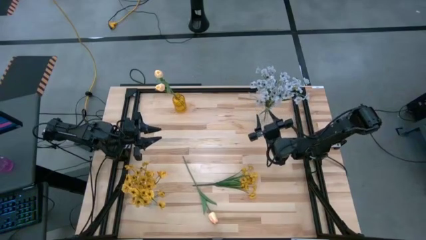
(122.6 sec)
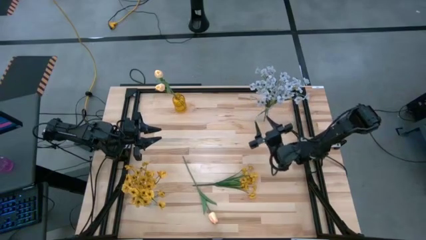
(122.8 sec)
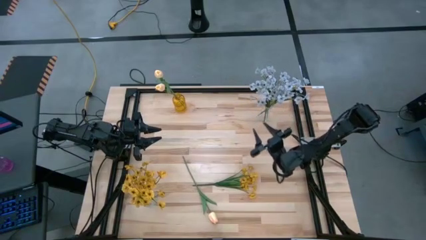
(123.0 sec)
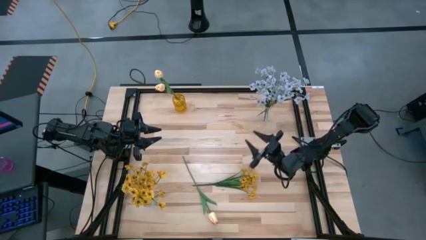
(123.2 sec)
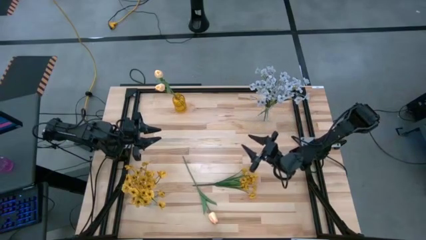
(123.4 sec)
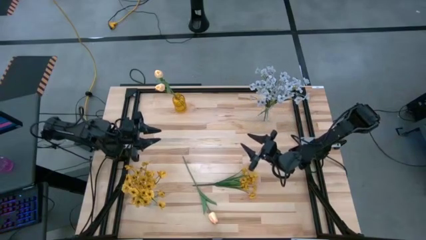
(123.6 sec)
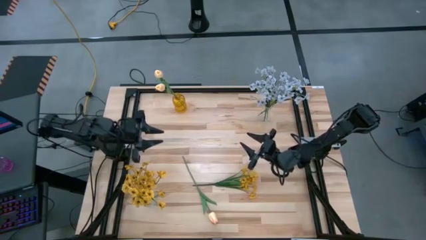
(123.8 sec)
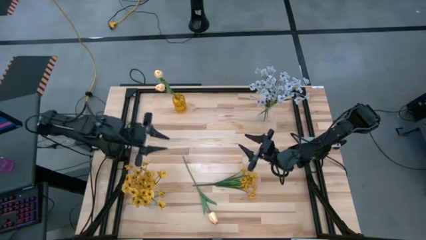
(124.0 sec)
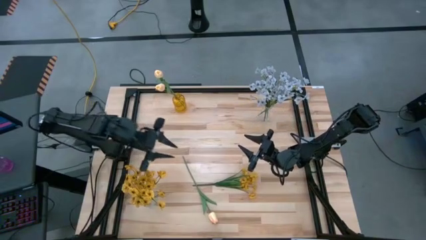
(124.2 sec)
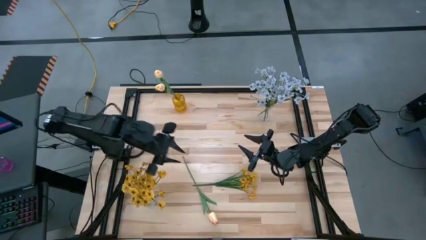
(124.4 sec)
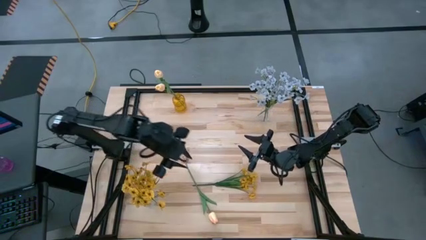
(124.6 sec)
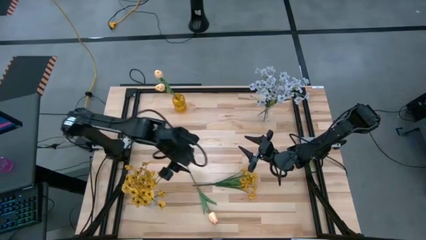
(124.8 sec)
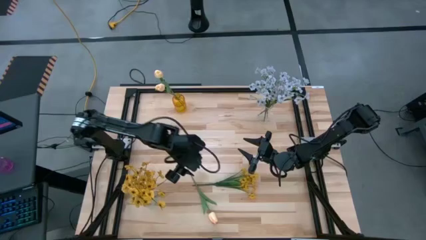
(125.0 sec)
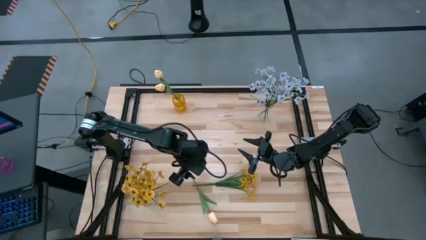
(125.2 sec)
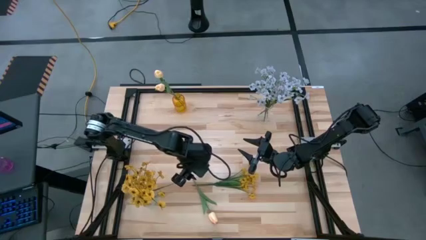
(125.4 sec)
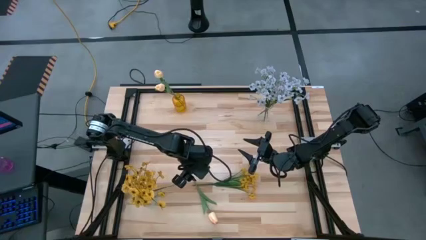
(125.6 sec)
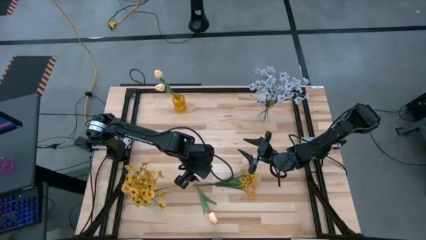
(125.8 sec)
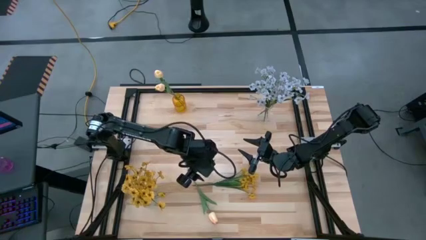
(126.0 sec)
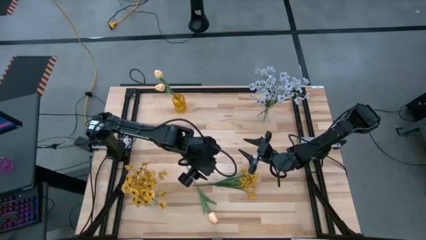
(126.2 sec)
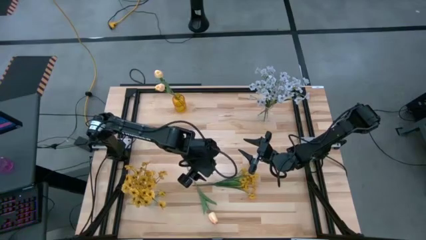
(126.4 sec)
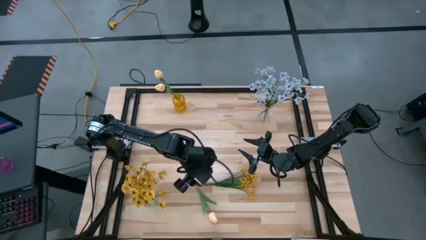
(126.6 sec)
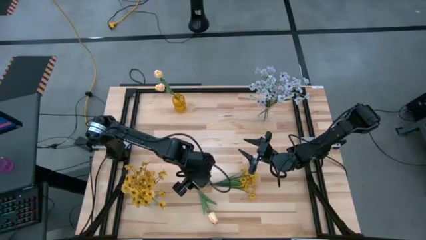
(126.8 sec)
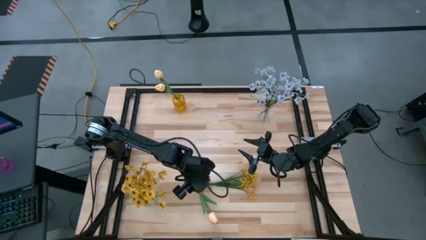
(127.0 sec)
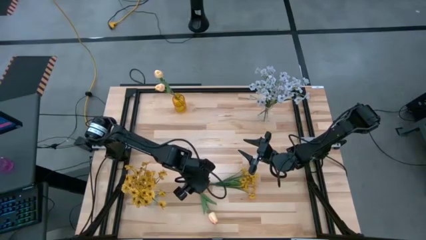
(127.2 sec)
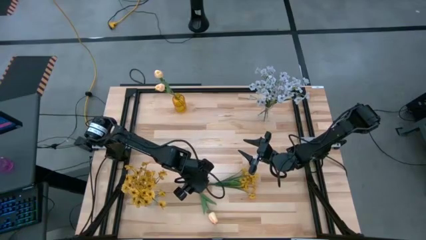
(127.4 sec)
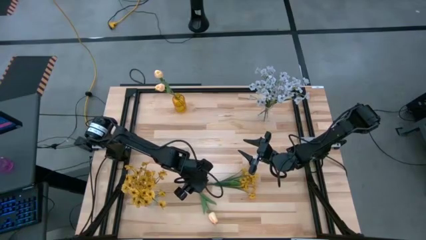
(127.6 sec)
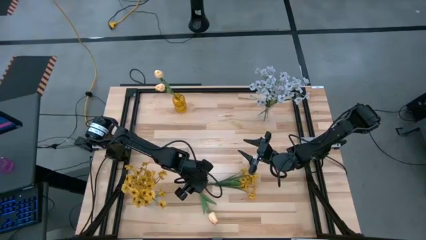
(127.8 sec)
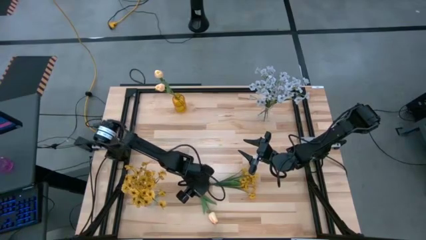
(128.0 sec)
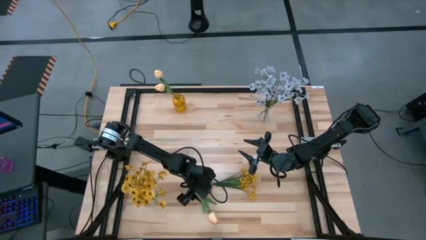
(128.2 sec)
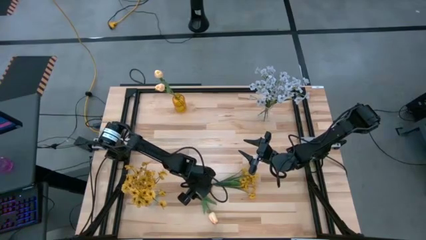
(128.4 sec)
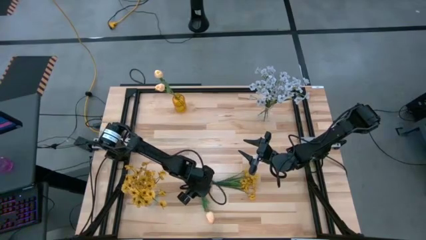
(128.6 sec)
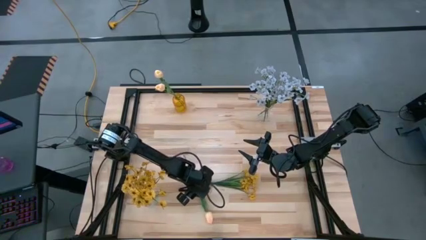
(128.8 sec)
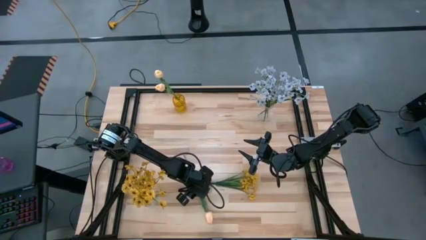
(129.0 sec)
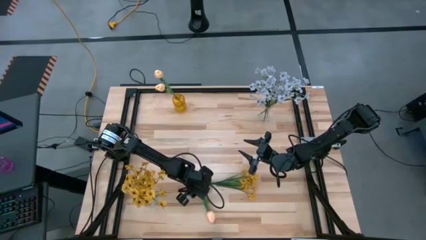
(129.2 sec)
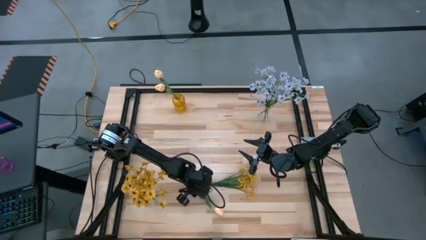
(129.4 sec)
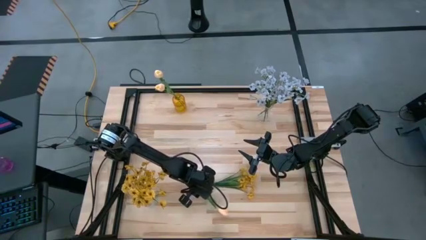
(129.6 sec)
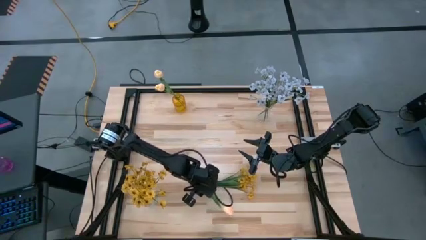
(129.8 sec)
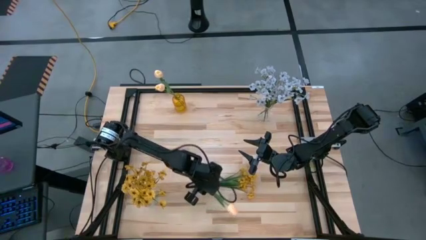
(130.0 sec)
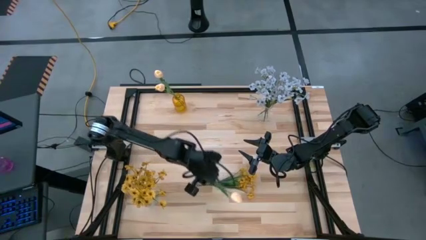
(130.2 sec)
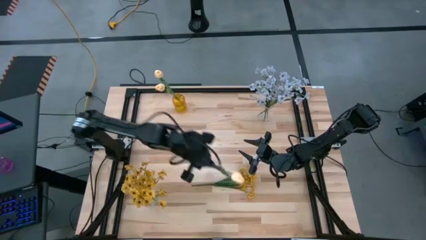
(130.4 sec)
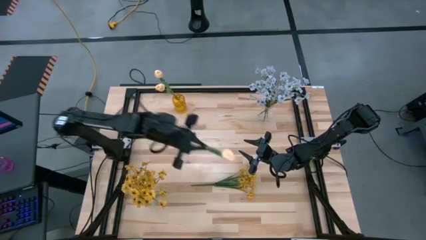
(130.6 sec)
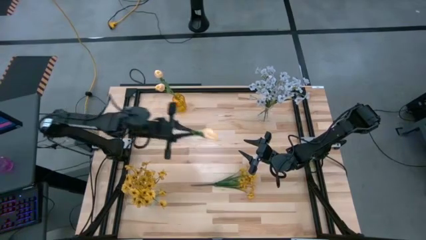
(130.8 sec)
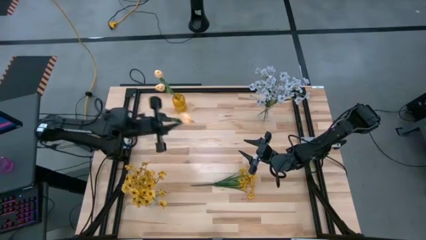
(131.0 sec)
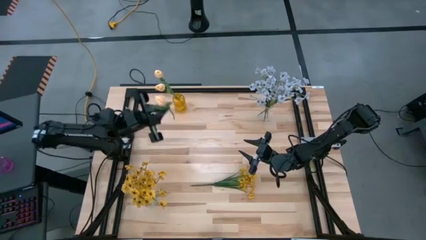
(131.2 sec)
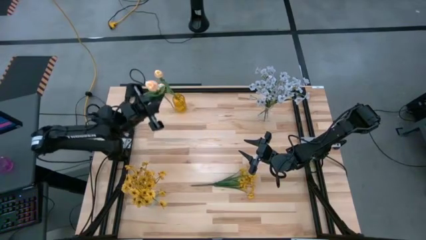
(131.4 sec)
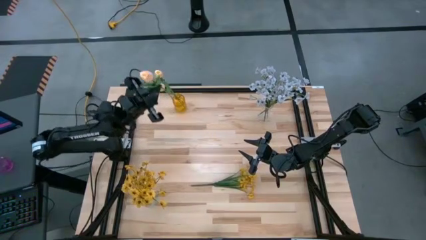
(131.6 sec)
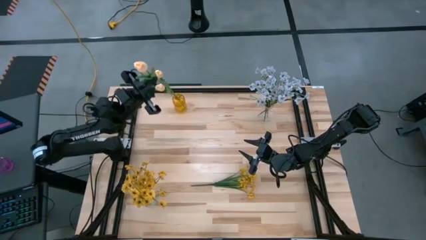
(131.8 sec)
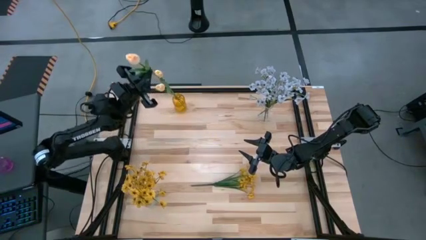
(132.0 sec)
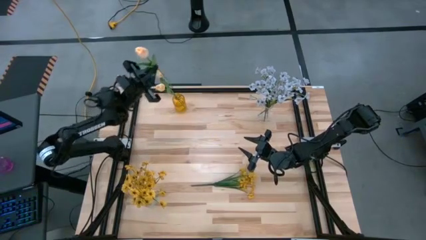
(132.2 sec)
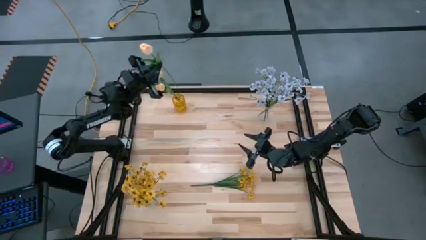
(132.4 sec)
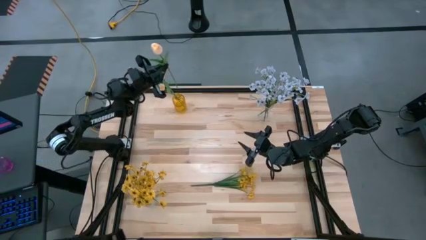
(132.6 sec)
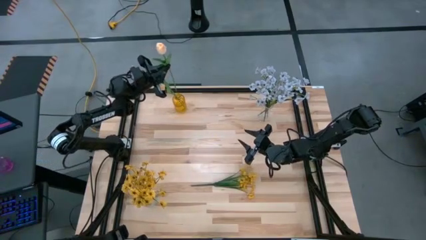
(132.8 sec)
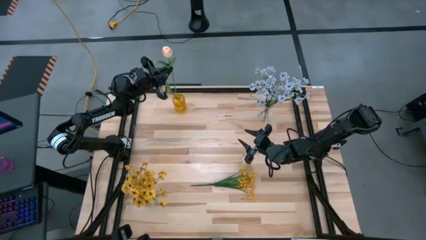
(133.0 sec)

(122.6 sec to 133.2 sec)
Task: Sort flowers into vase by color
Put the pink tulip into the yellow vase

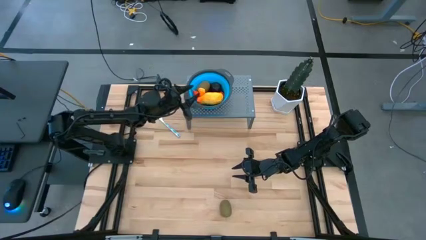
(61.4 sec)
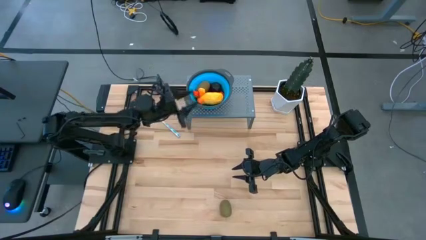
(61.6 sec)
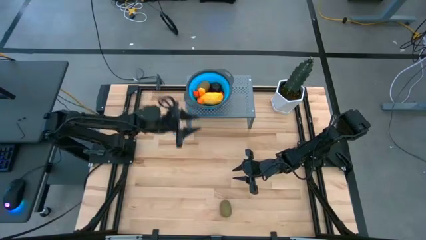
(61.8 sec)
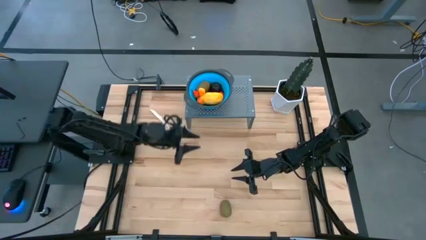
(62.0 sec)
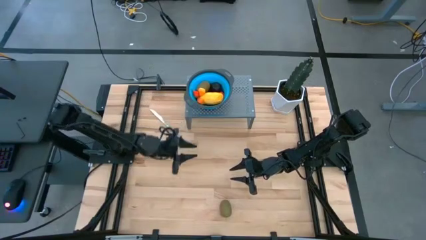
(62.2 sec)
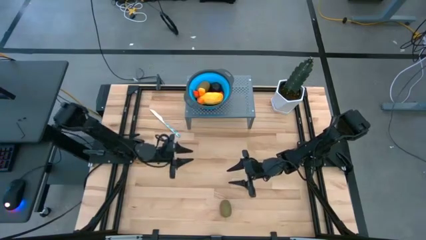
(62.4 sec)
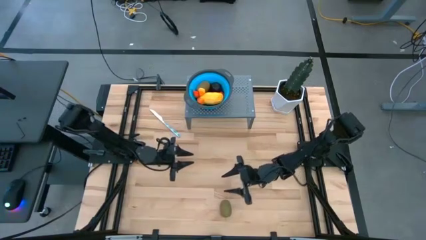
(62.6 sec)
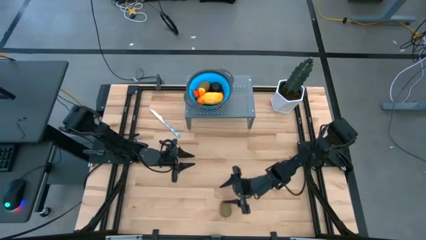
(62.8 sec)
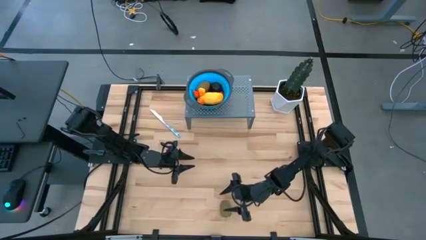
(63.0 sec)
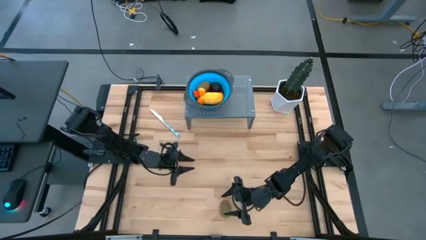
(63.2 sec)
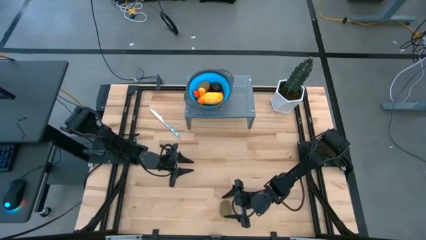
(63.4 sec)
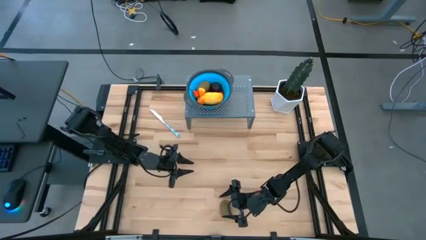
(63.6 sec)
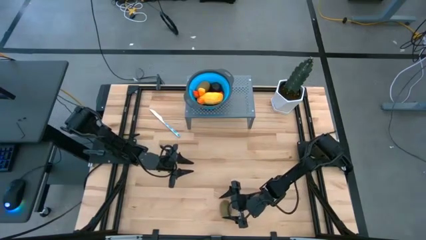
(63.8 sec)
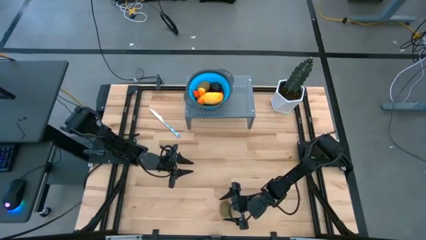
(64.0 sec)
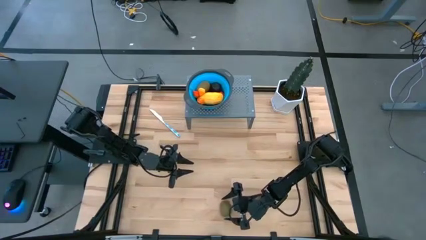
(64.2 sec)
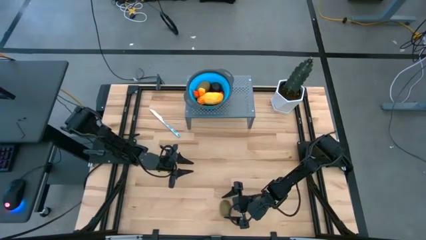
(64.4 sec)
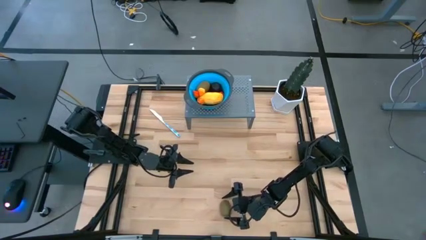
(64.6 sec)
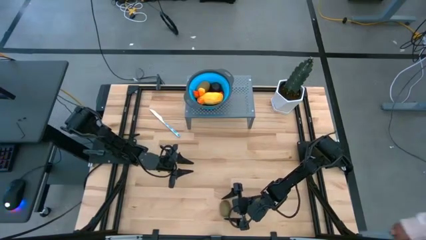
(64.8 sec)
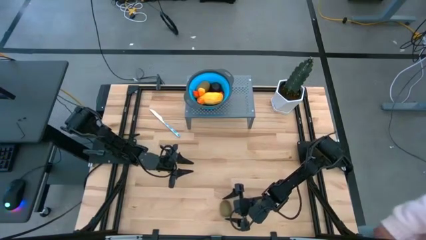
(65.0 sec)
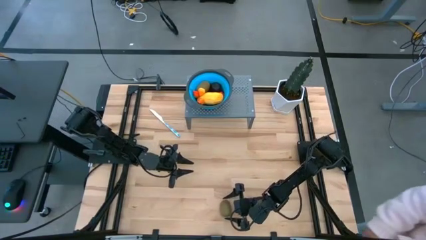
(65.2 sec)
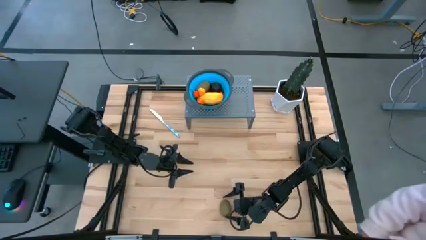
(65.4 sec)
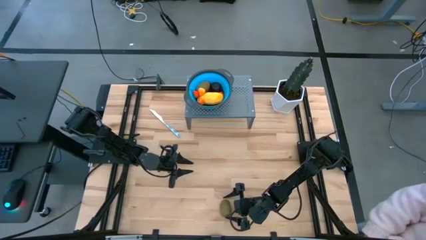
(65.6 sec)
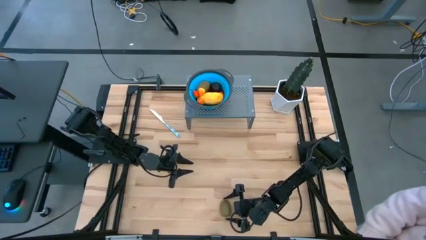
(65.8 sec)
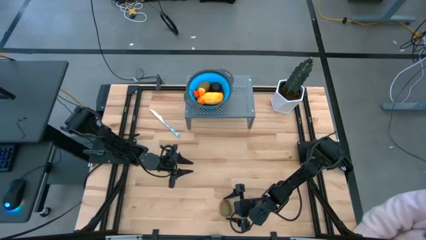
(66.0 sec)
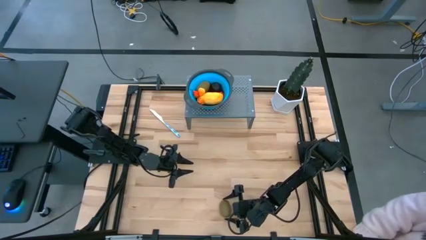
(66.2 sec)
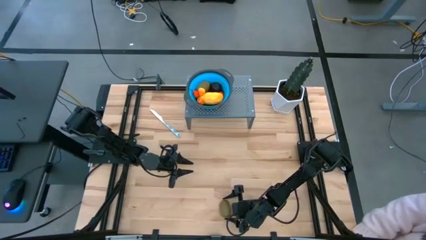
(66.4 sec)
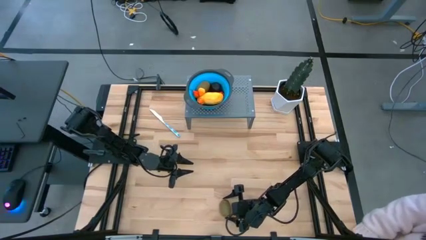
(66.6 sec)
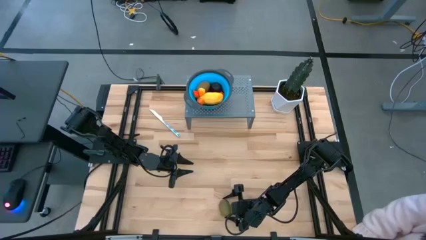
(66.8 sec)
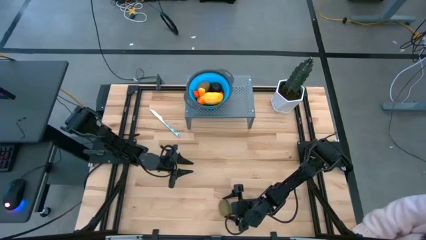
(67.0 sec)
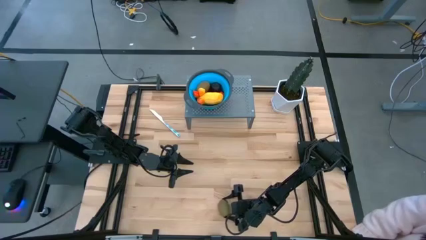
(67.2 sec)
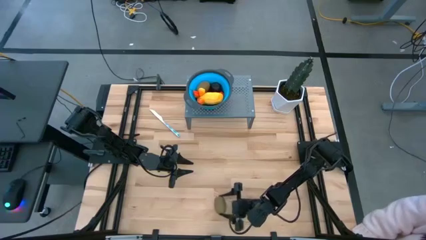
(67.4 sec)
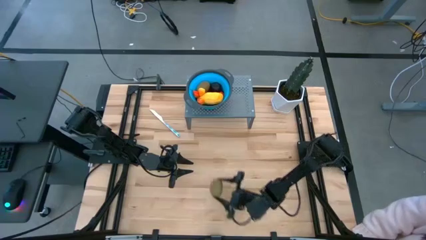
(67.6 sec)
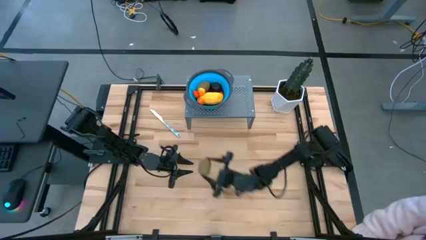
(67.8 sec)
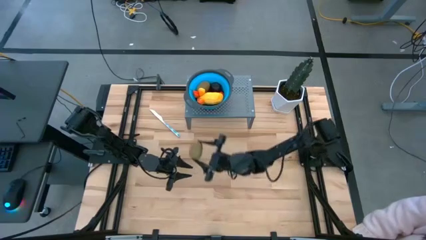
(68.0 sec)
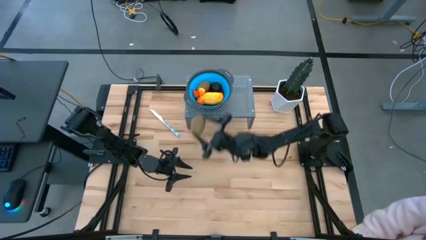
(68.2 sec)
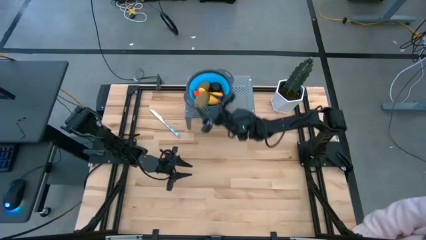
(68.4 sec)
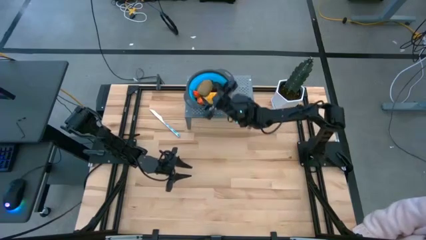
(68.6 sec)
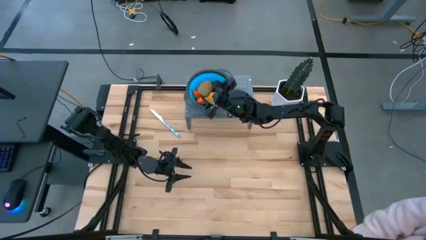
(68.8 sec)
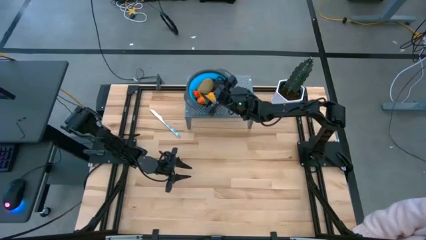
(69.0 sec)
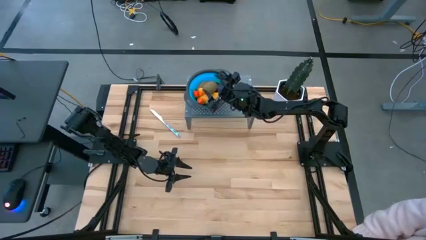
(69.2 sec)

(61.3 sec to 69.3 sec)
Task: Pick & Place Fruit
Put the green kiwi into the blue strainer bowl
